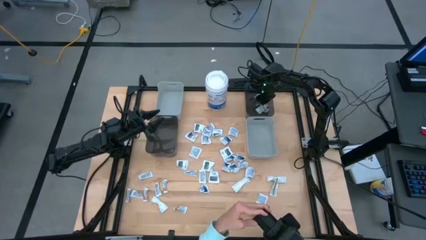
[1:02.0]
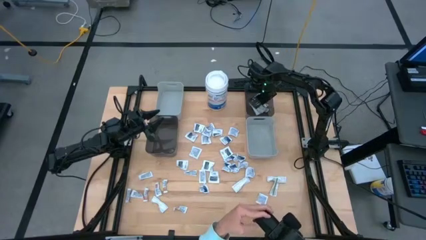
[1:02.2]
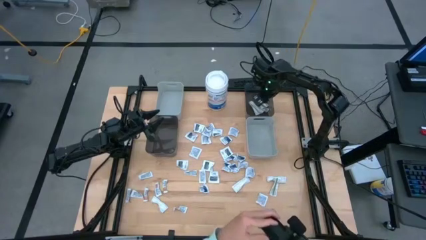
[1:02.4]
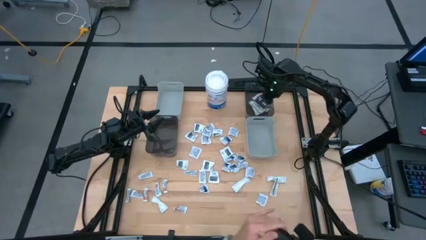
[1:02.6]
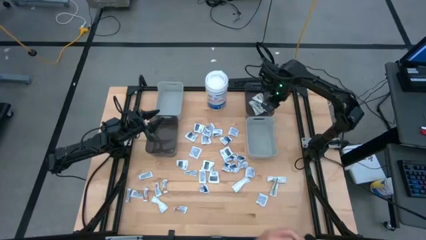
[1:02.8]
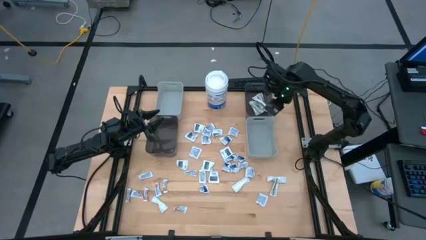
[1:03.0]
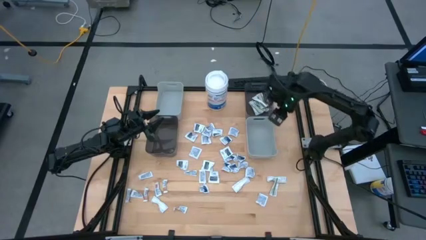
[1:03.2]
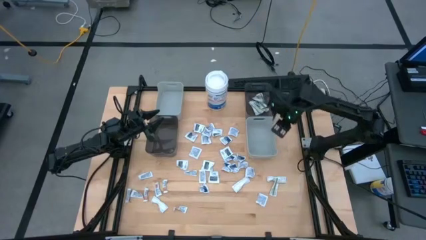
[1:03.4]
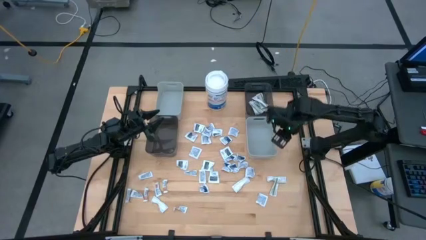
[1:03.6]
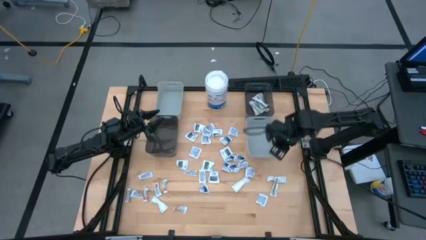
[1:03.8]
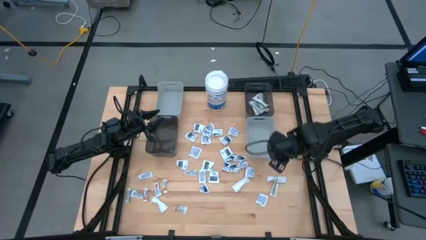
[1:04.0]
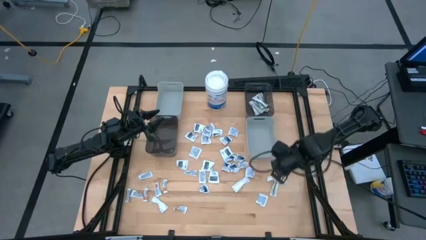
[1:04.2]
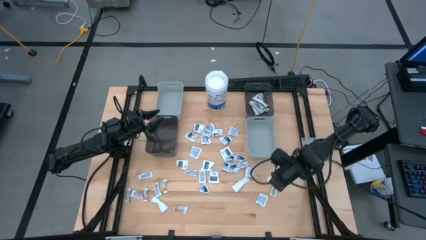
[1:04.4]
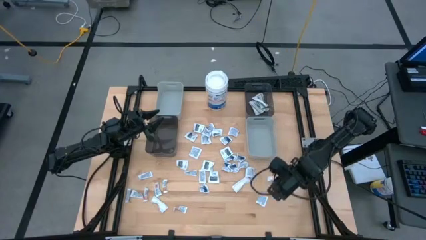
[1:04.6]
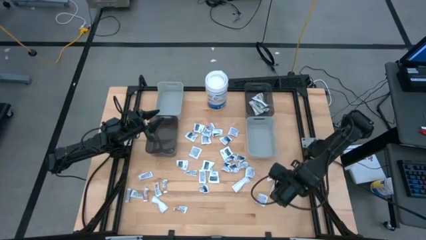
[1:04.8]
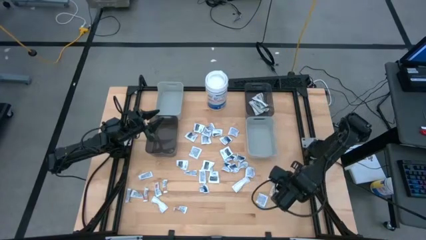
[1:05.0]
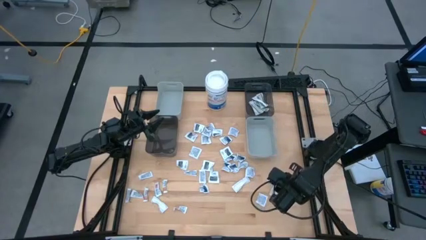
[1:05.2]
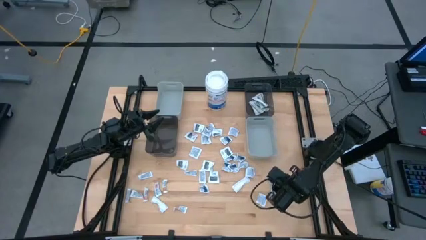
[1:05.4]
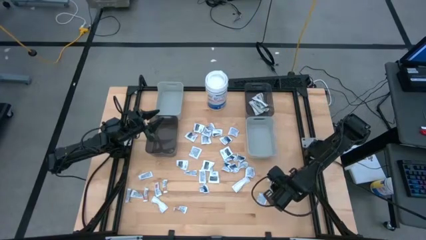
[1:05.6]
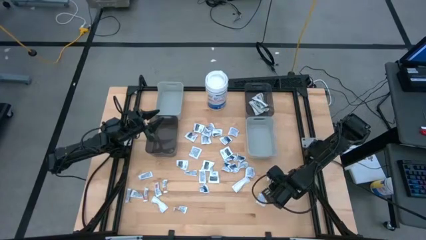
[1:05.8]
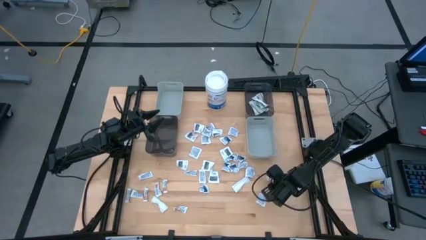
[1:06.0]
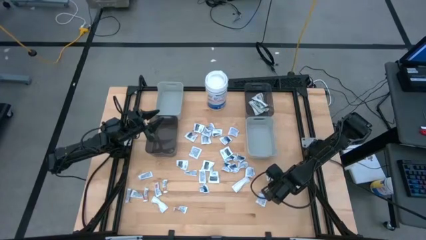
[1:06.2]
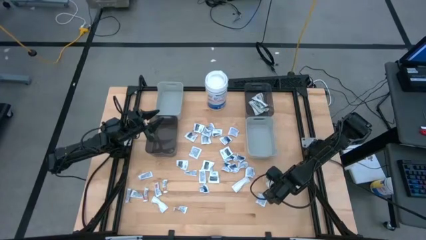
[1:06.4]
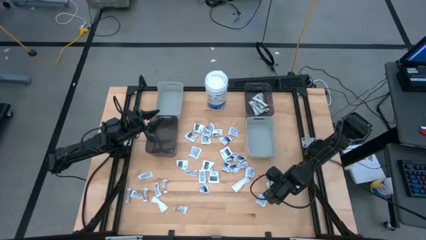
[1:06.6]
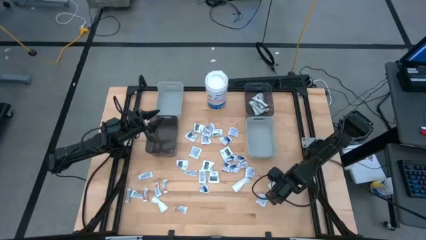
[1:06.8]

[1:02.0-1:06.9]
Task: Pick & Place First Aid Supplies
Put the green bandage into the right black bin

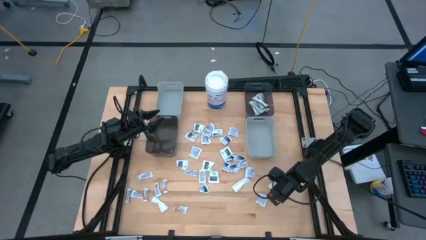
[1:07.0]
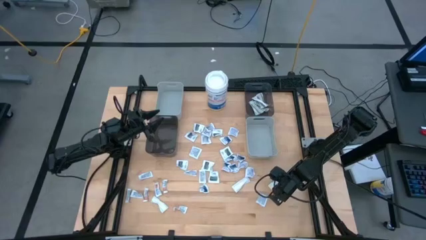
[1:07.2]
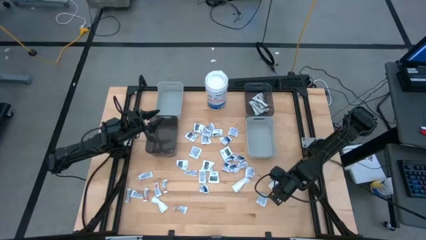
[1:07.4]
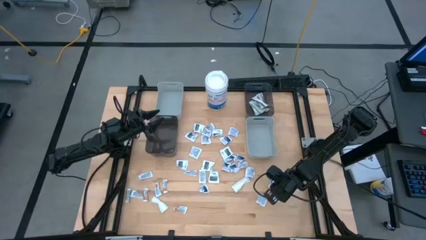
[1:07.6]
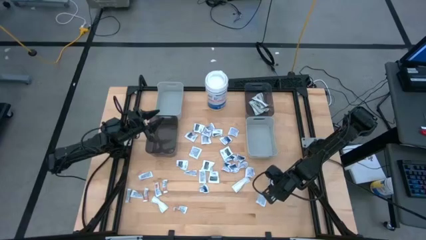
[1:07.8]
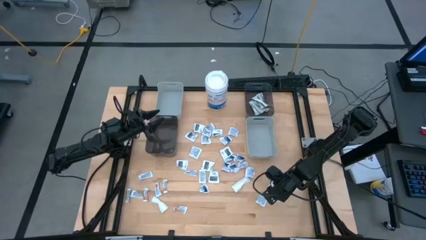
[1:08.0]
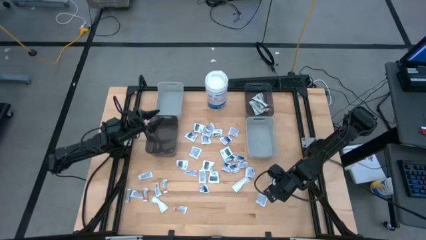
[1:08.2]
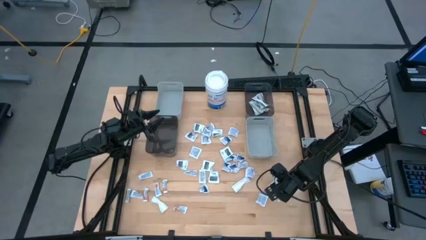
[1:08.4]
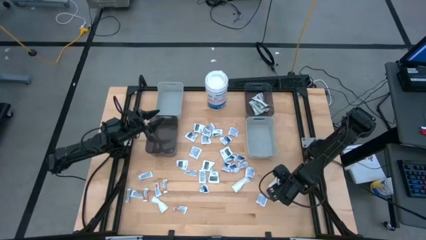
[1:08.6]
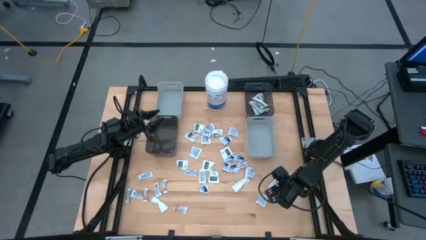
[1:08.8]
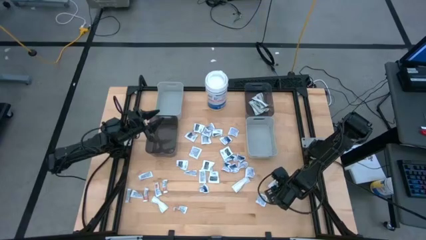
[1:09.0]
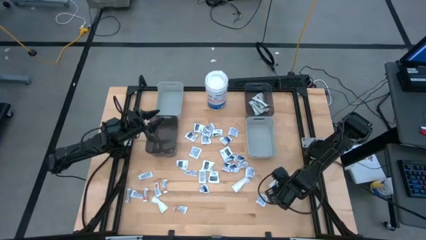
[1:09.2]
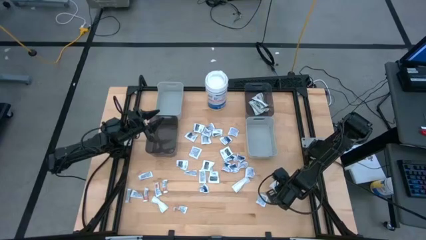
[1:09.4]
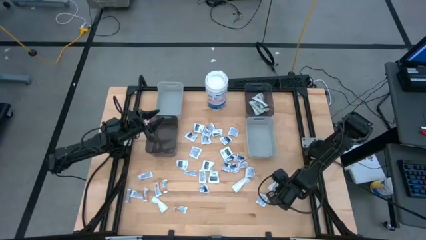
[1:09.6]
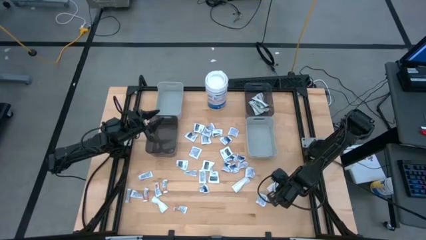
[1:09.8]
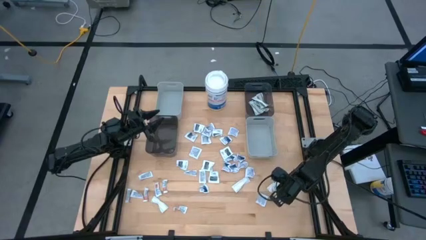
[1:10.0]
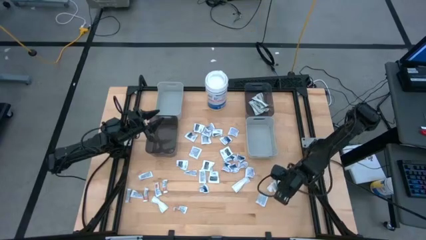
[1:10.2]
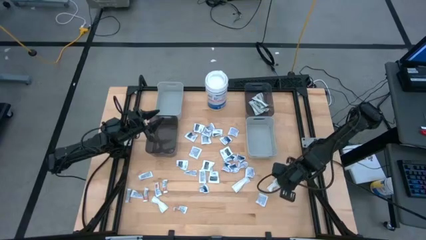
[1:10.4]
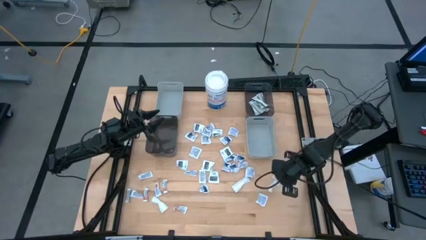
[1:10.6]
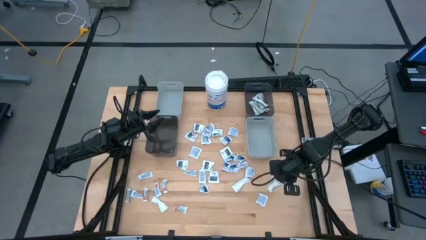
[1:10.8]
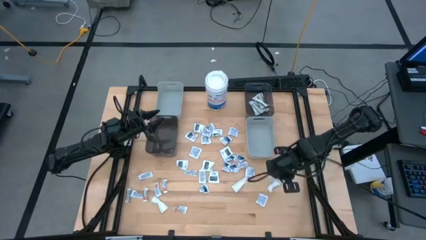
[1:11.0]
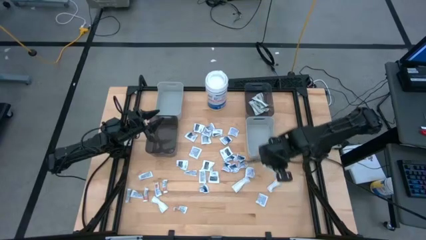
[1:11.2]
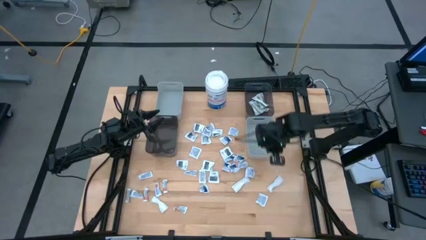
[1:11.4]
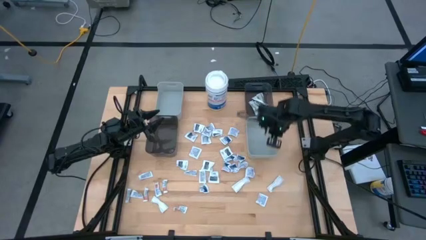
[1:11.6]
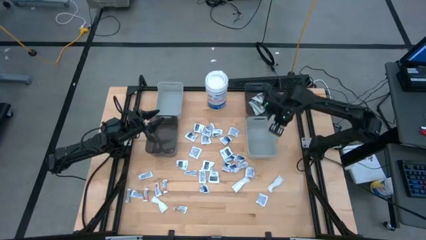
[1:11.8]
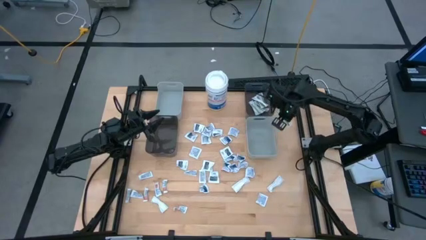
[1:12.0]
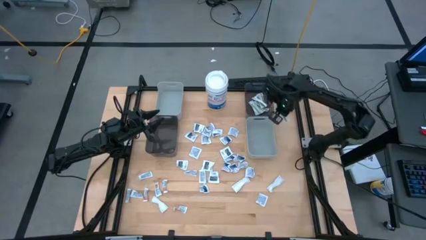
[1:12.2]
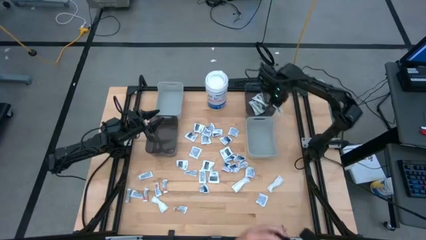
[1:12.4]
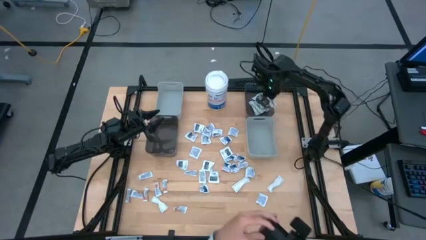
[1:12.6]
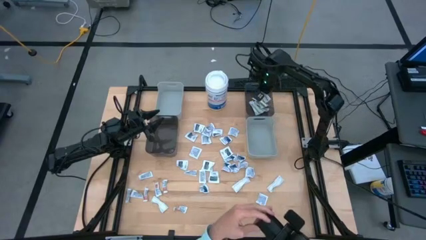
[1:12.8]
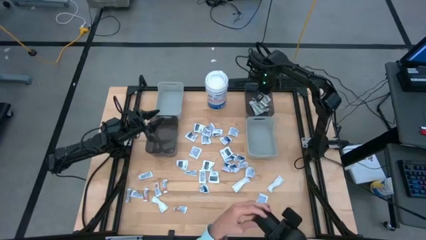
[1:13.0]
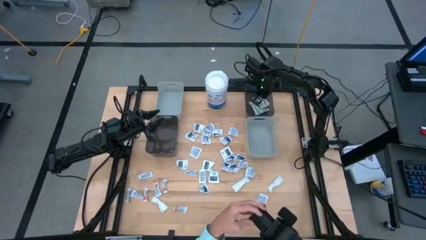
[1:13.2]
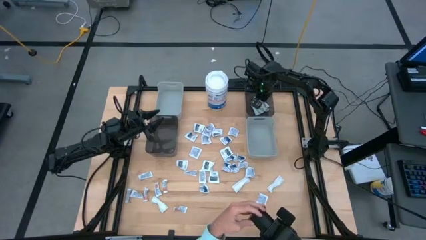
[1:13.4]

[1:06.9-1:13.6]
Put the green bandage into the right black bin
